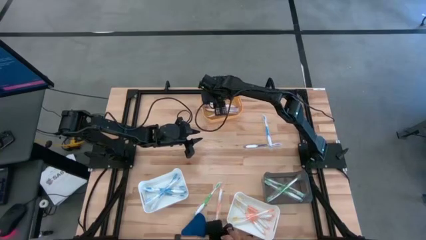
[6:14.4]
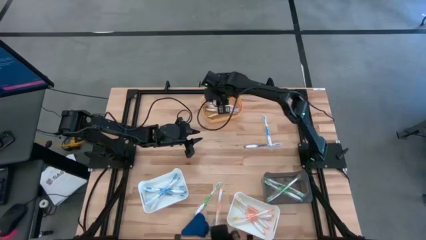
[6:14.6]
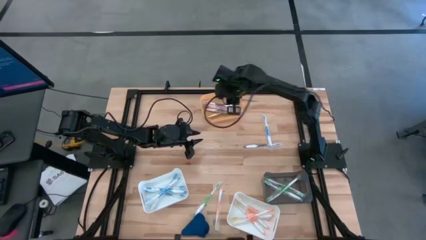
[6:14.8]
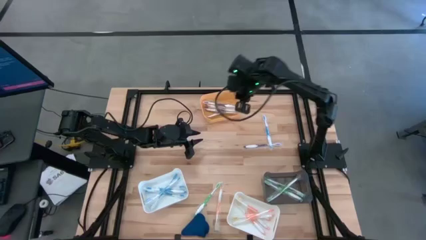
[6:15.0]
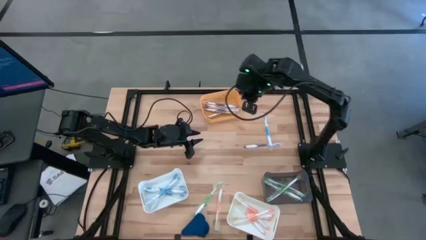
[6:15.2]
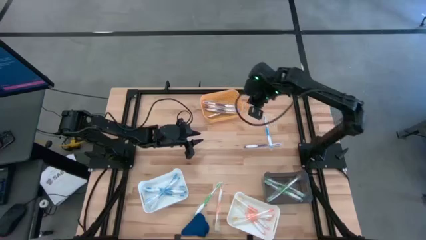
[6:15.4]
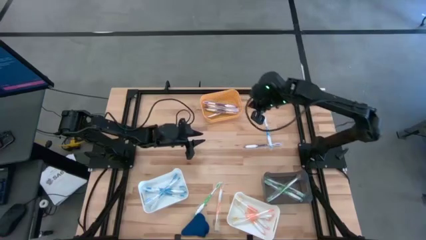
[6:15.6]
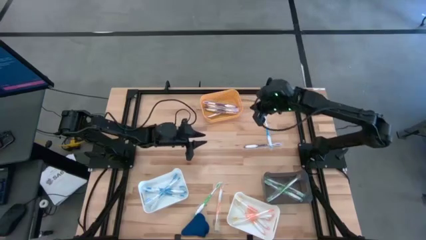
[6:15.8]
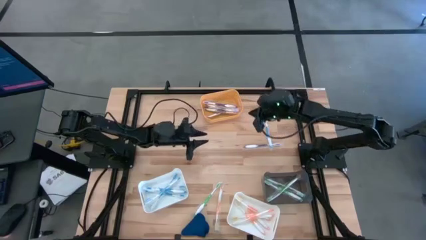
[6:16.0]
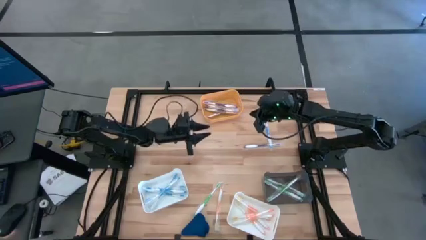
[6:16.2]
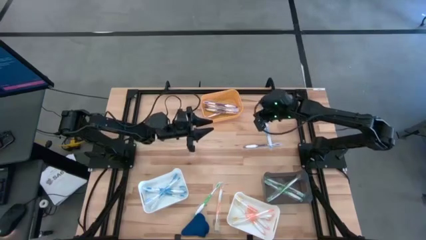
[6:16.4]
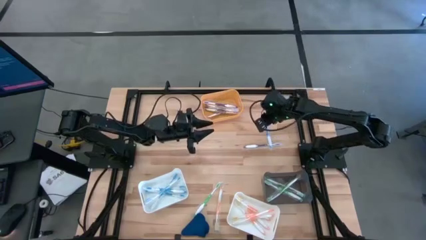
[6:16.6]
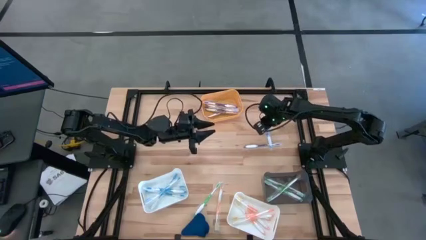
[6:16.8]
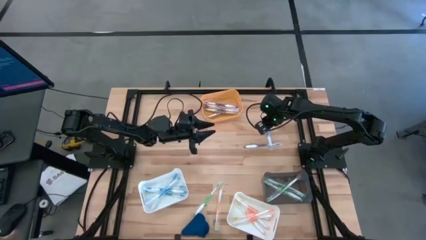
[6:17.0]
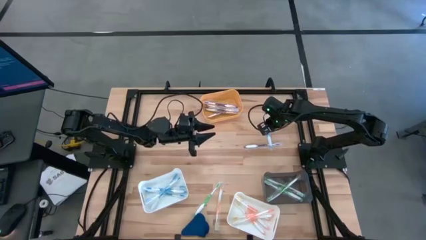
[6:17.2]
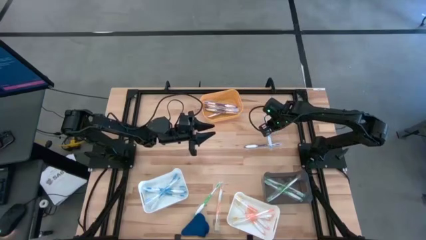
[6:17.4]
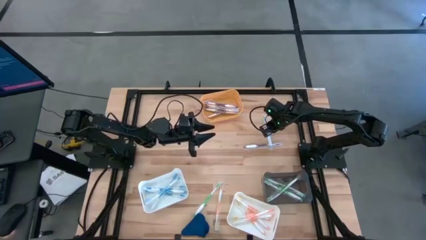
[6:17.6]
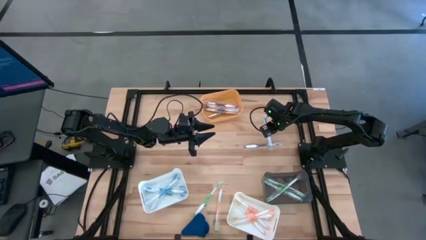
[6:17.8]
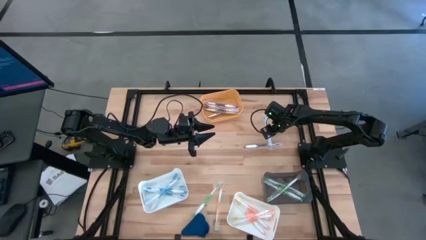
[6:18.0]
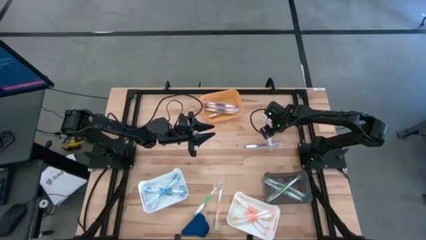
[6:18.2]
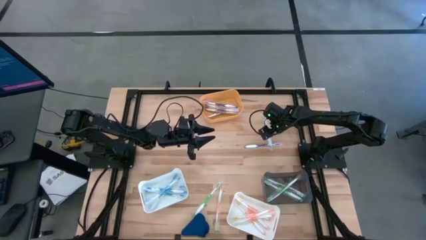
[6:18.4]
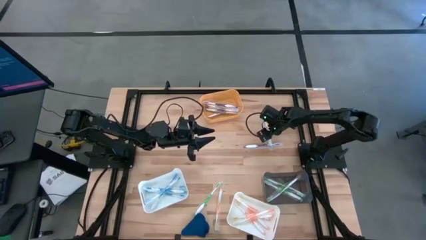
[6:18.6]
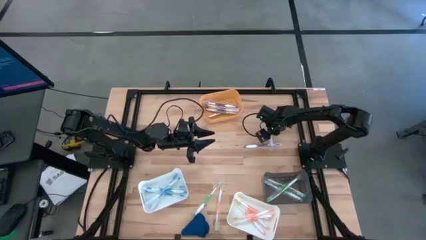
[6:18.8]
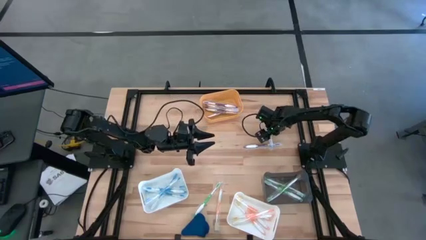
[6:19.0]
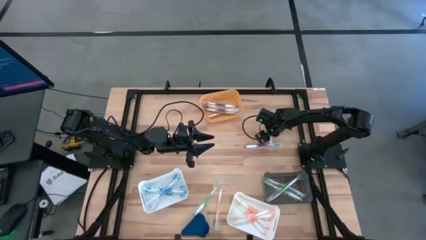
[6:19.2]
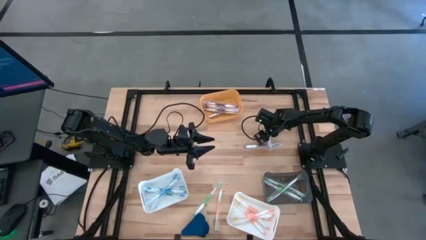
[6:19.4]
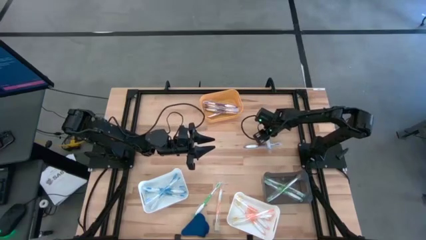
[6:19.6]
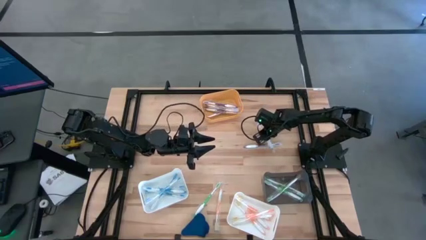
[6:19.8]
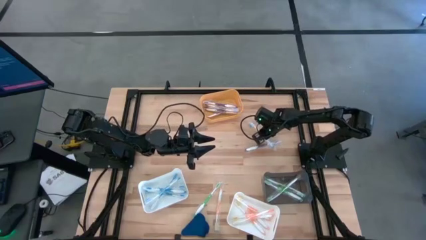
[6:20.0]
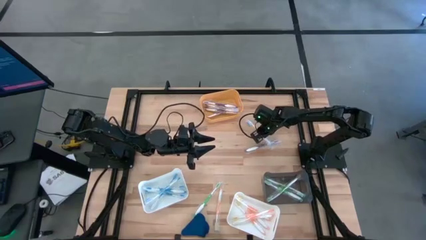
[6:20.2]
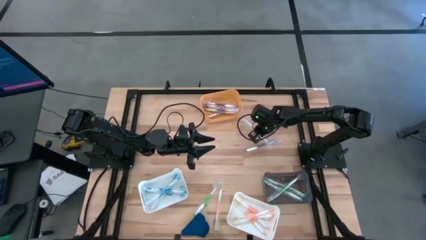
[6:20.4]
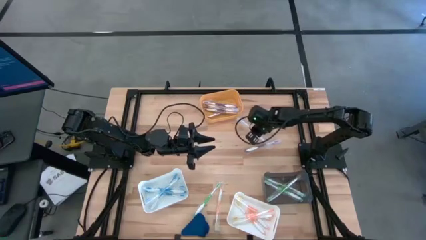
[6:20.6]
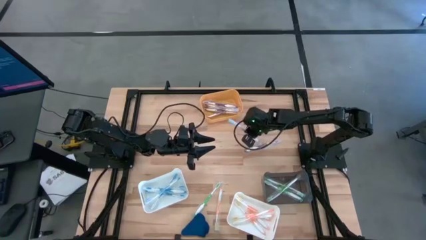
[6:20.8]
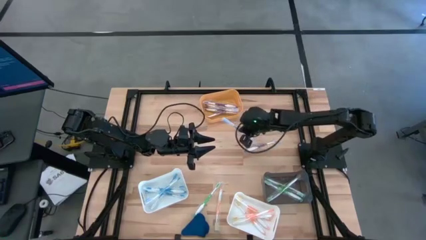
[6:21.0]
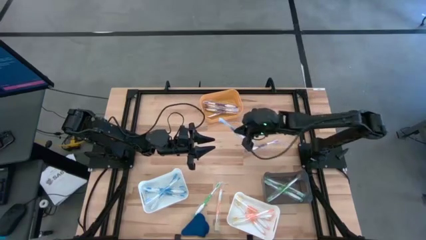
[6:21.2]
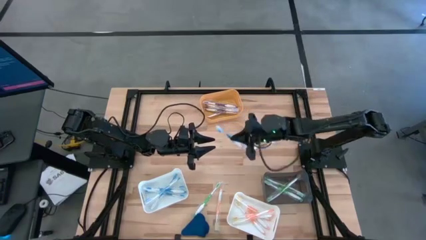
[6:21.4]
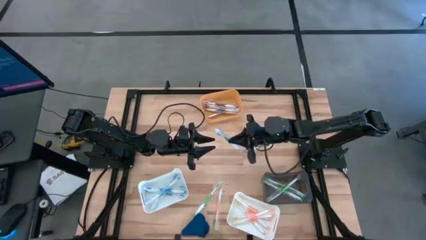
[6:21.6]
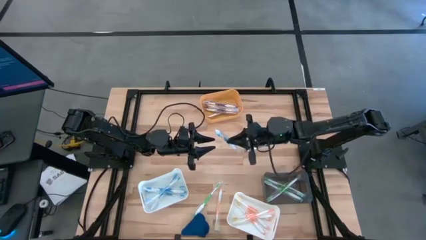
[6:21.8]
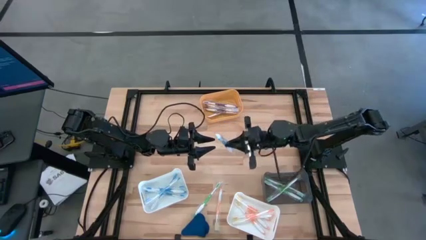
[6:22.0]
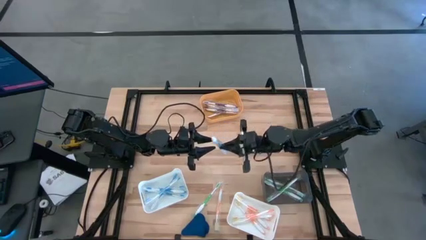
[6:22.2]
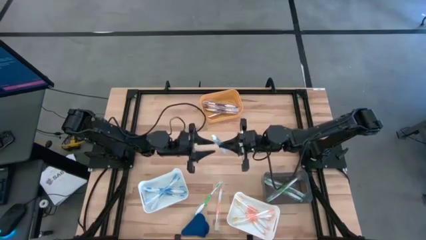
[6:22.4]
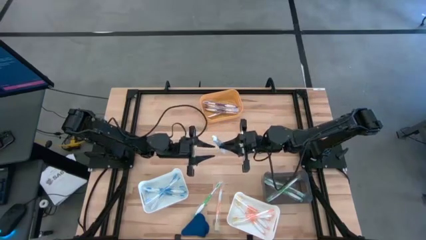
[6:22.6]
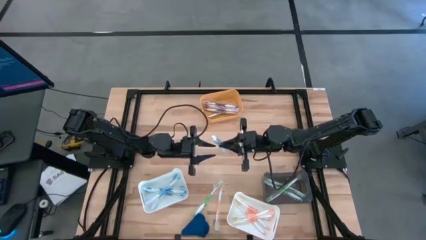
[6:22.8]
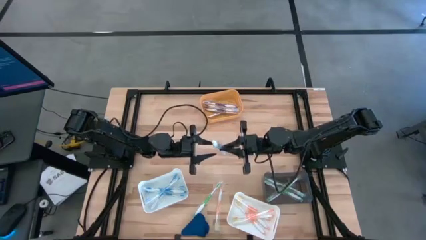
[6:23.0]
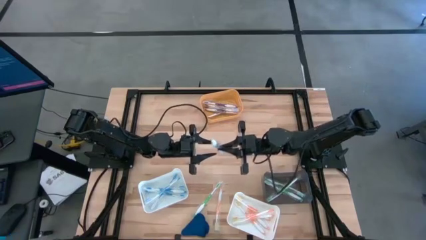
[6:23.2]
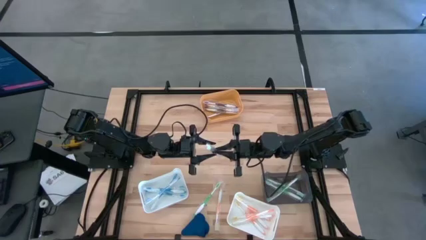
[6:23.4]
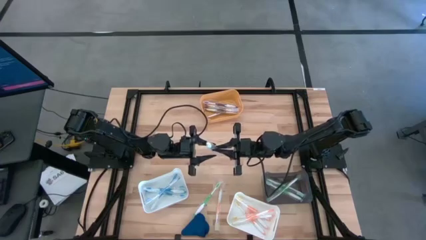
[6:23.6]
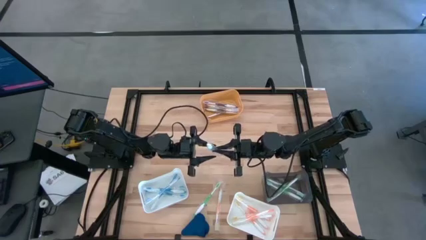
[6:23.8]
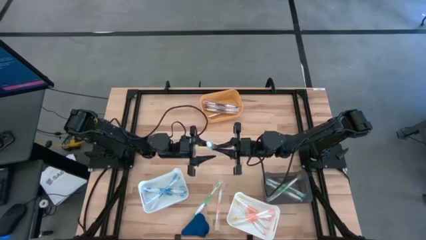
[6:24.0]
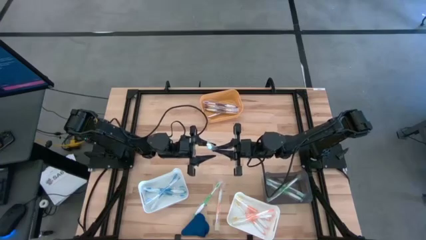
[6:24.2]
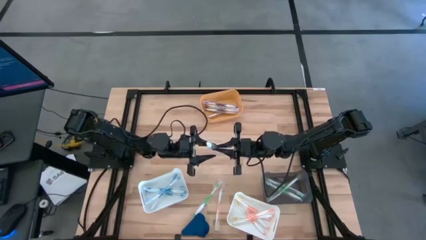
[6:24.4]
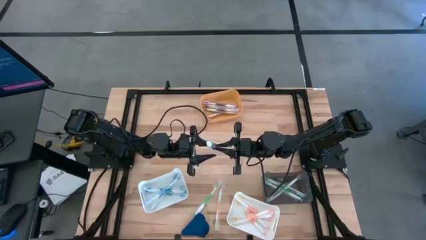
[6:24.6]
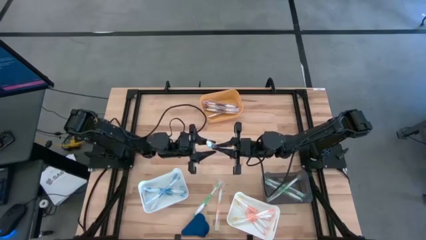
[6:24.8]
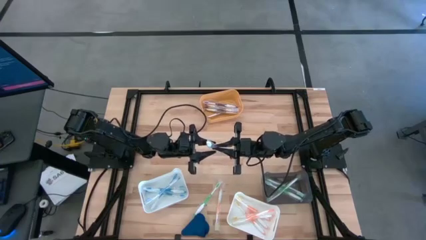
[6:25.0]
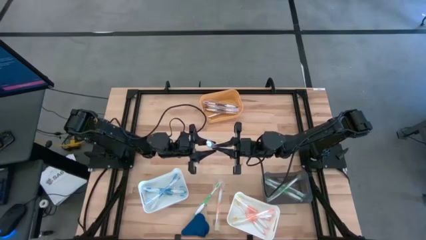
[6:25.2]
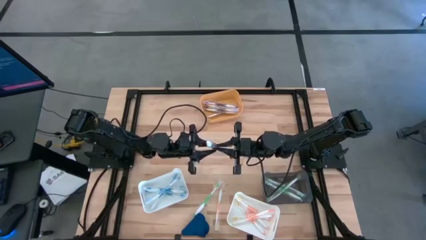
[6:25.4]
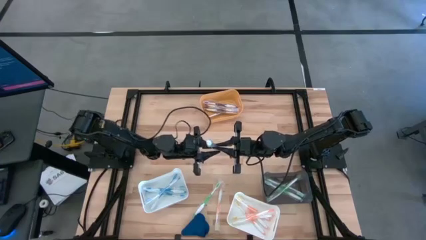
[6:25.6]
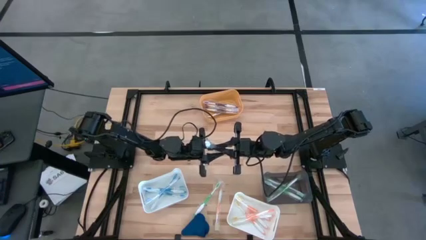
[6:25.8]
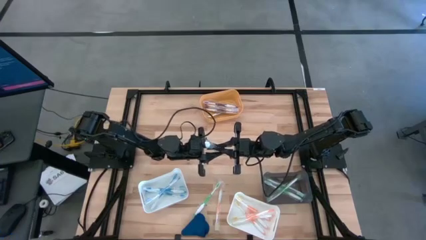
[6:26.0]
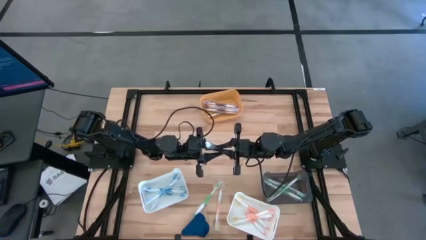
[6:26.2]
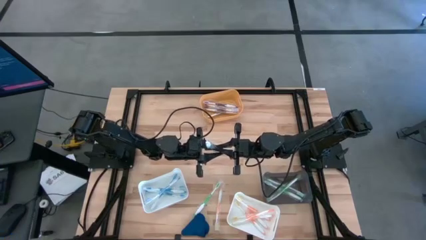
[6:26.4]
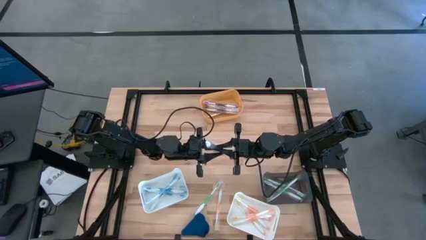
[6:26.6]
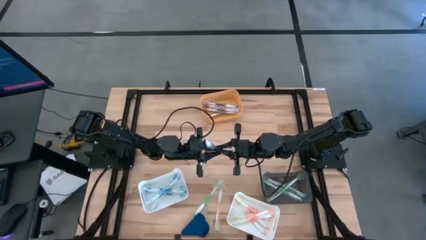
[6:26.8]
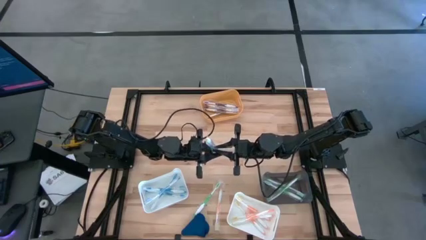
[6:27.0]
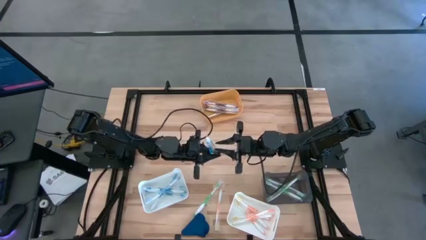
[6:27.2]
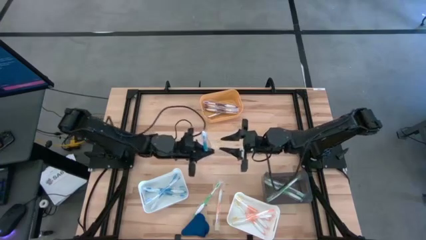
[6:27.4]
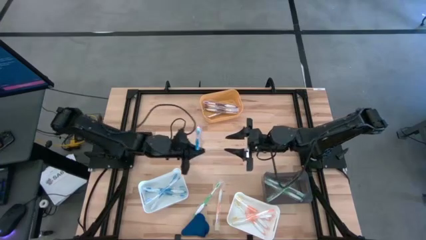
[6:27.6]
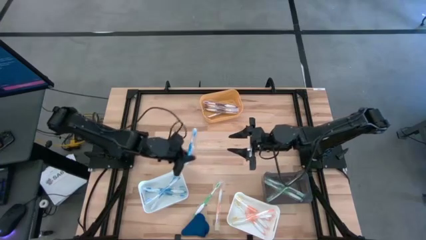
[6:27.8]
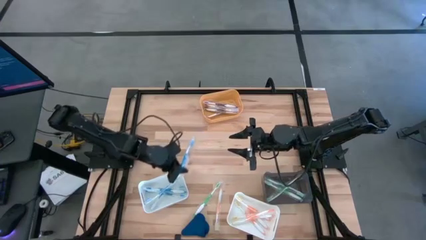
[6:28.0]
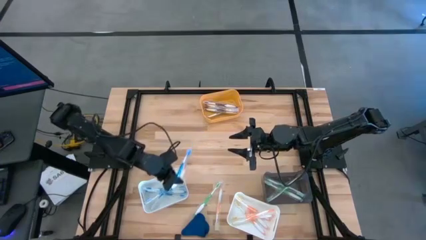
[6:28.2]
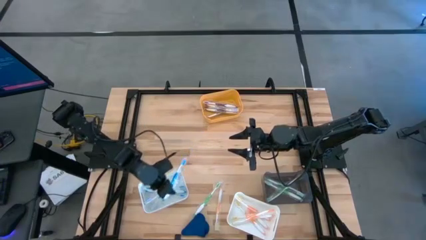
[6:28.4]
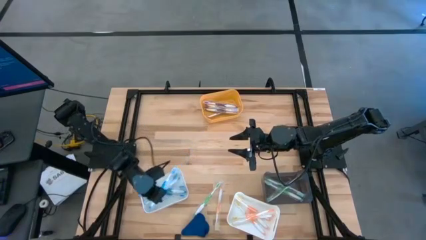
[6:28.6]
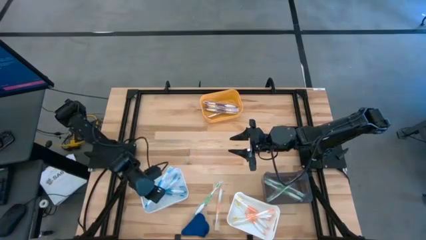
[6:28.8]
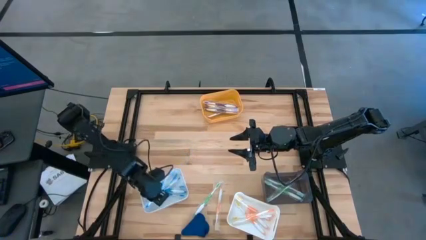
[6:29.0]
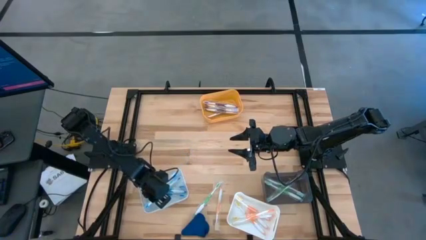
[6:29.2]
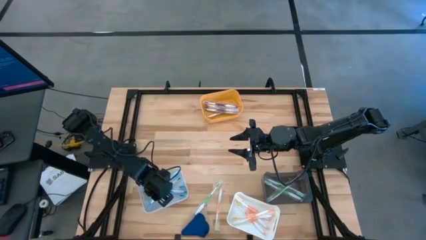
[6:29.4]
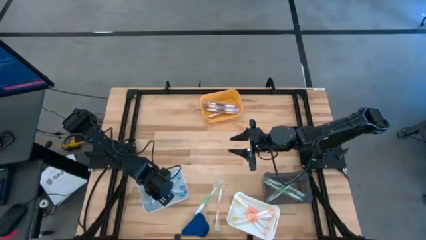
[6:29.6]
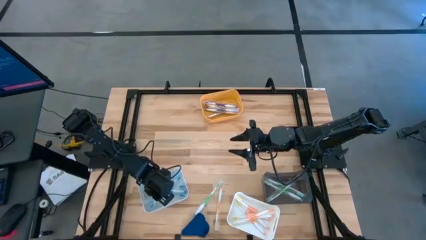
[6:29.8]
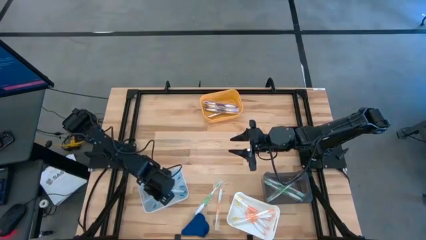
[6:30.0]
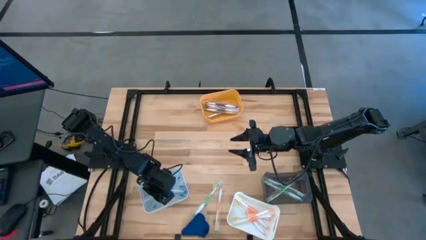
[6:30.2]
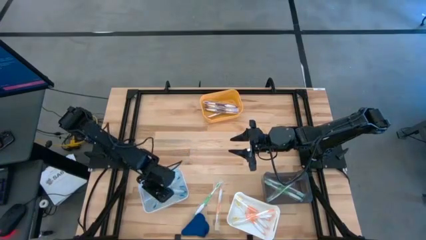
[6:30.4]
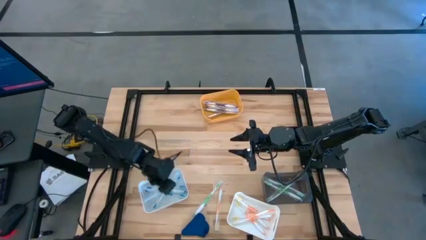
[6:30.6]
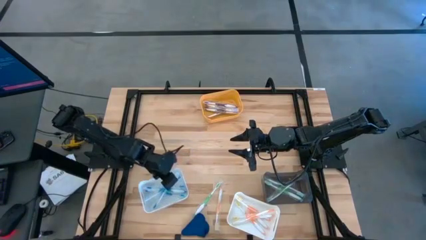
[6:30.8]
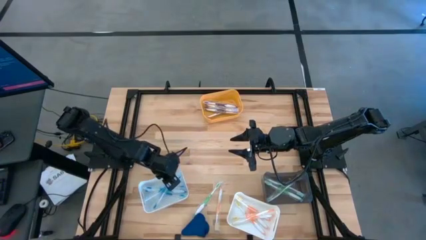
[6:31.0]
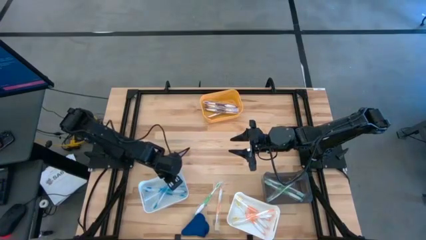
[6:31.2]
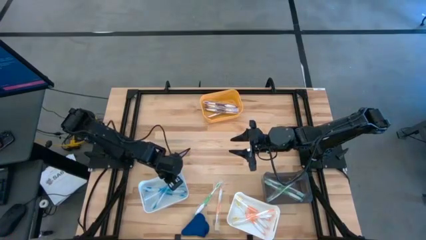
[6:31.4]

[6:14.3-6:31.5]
Task: Pick & Place Toothbrushes
Put the blue toothbrush into the left white bin
